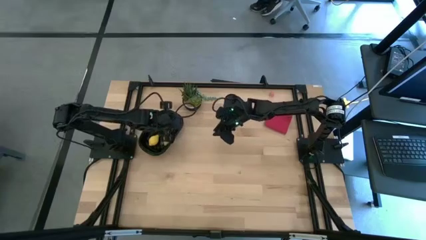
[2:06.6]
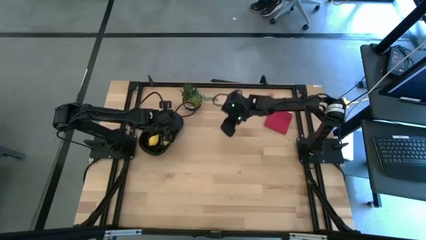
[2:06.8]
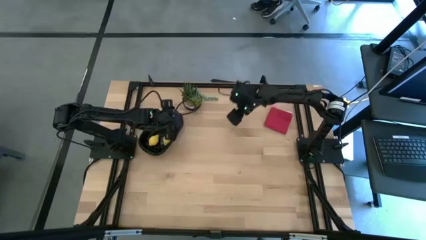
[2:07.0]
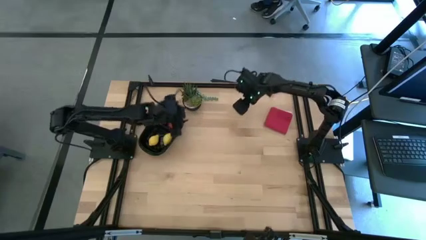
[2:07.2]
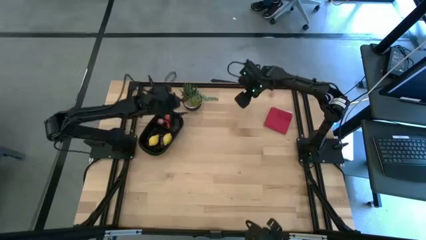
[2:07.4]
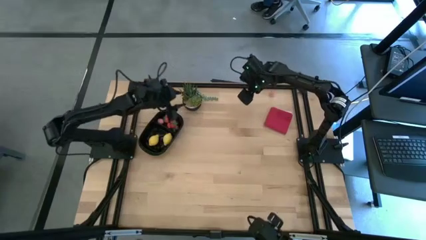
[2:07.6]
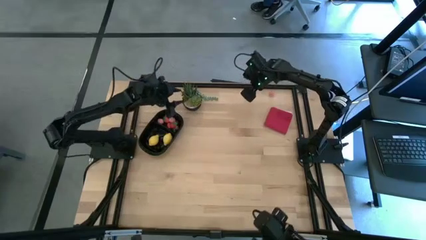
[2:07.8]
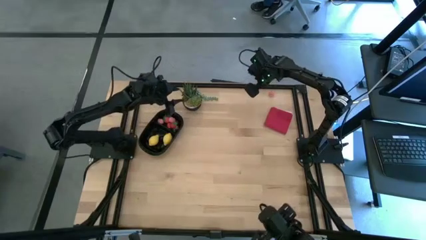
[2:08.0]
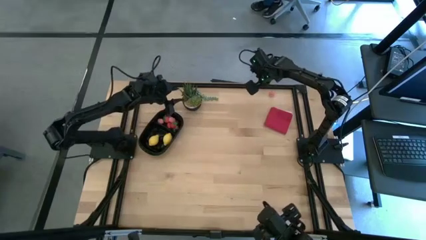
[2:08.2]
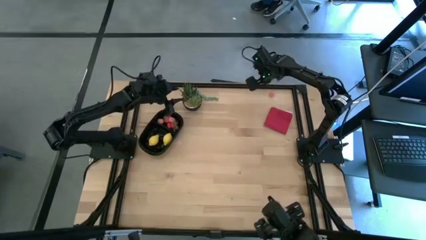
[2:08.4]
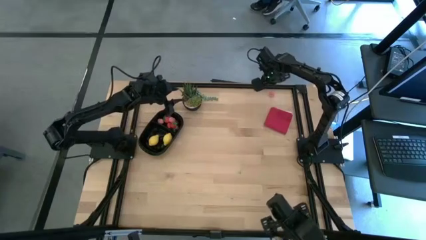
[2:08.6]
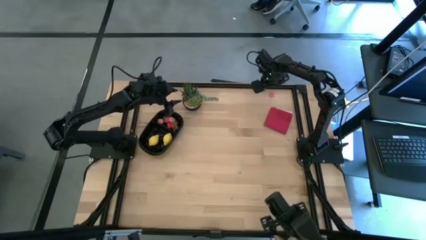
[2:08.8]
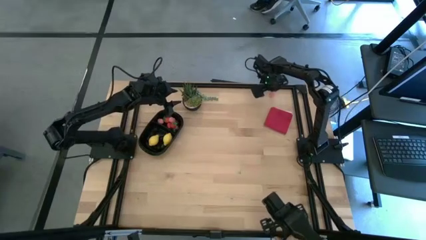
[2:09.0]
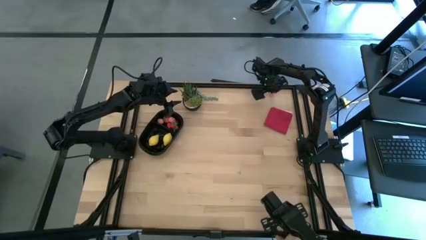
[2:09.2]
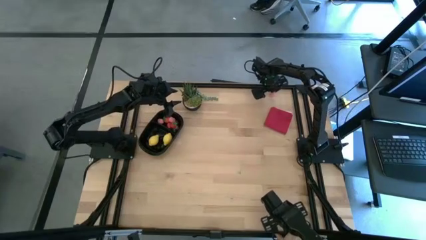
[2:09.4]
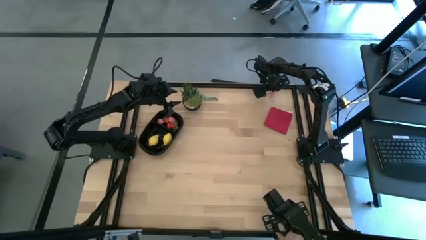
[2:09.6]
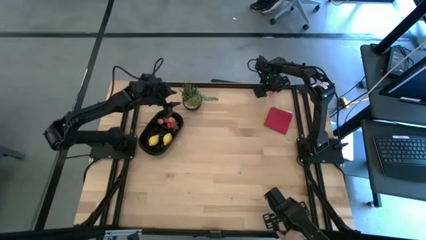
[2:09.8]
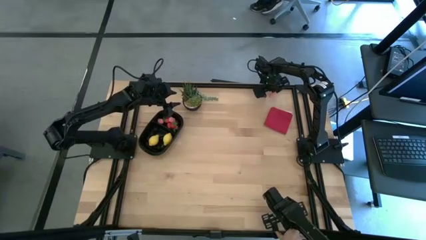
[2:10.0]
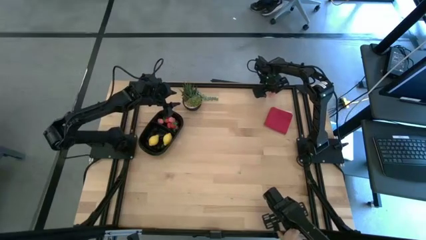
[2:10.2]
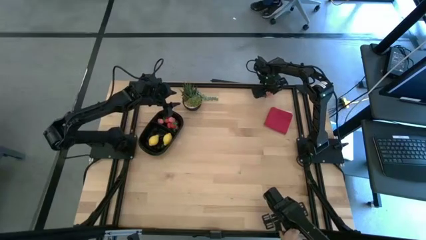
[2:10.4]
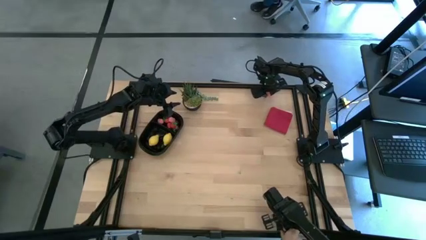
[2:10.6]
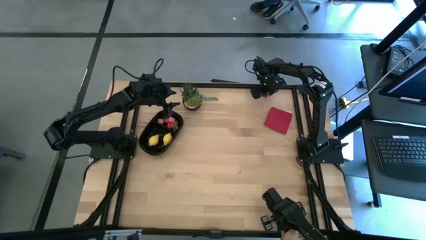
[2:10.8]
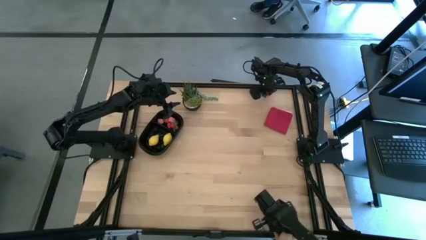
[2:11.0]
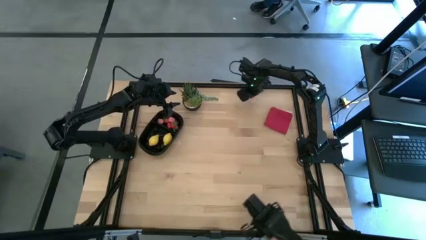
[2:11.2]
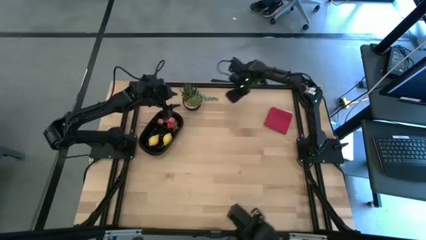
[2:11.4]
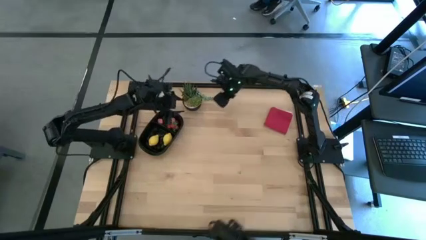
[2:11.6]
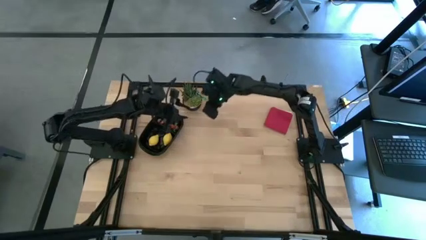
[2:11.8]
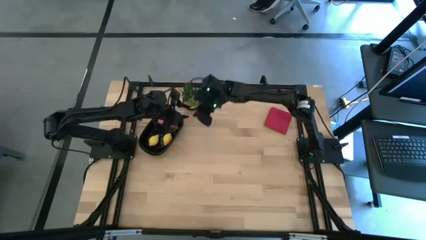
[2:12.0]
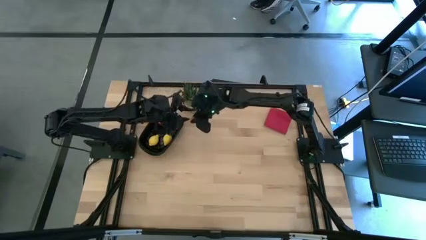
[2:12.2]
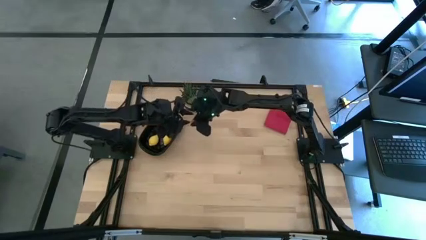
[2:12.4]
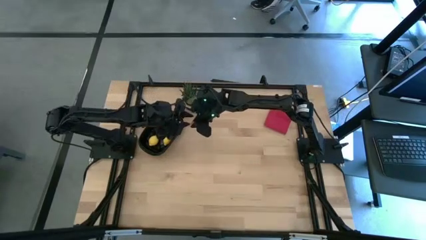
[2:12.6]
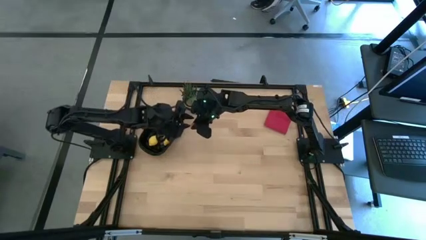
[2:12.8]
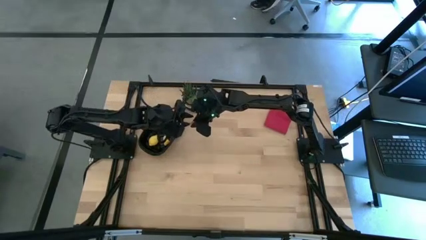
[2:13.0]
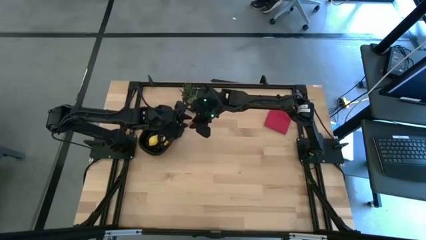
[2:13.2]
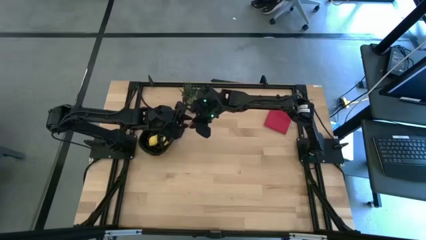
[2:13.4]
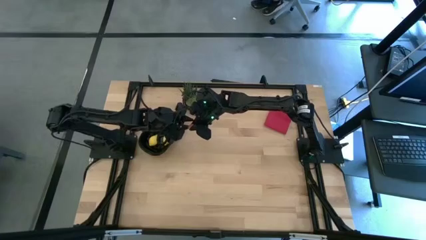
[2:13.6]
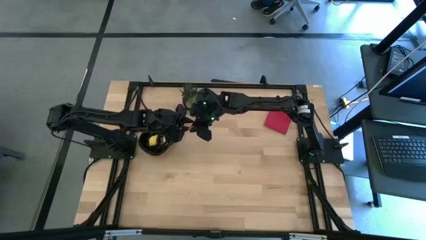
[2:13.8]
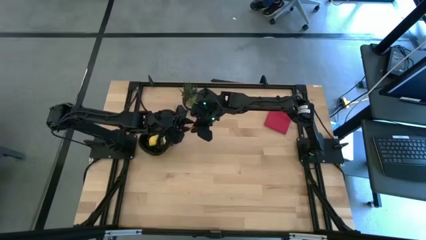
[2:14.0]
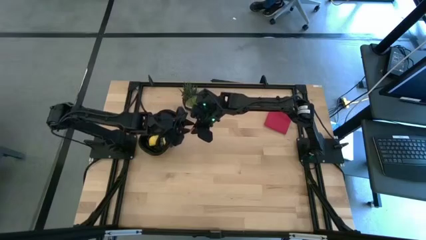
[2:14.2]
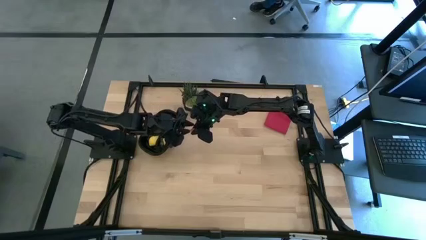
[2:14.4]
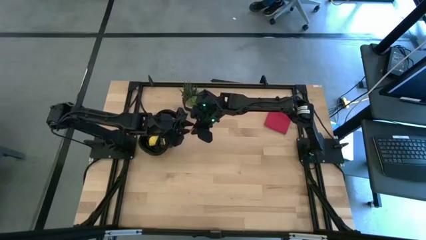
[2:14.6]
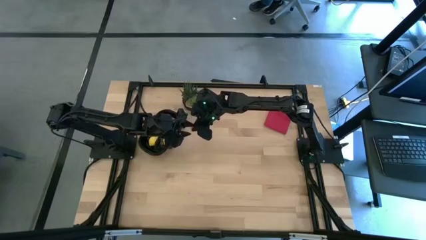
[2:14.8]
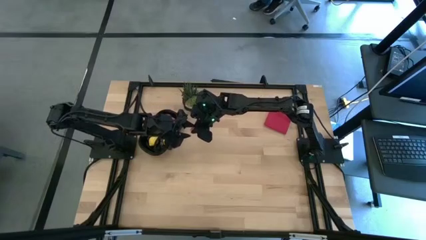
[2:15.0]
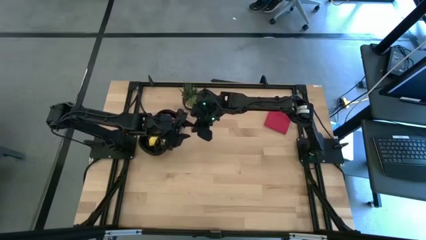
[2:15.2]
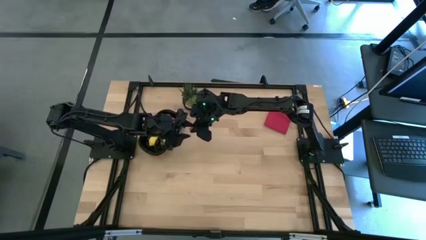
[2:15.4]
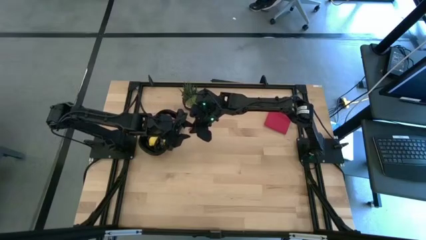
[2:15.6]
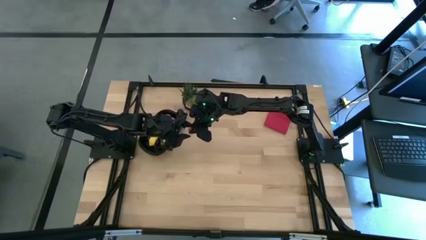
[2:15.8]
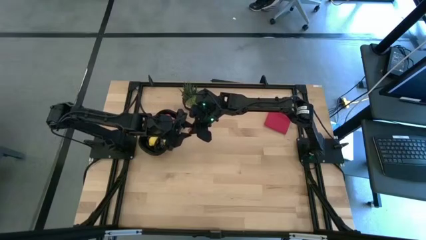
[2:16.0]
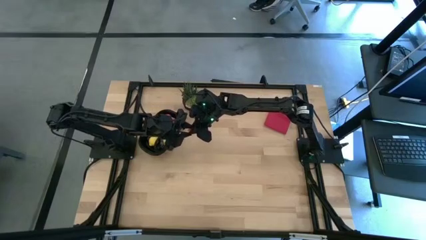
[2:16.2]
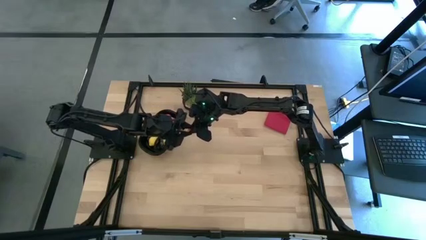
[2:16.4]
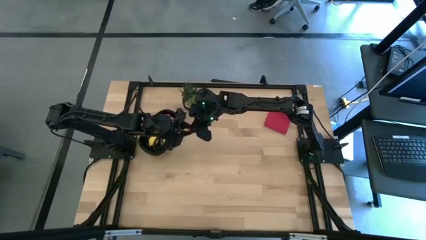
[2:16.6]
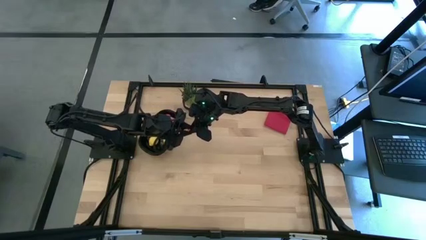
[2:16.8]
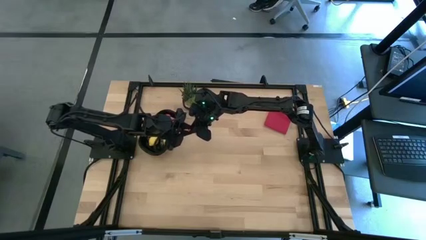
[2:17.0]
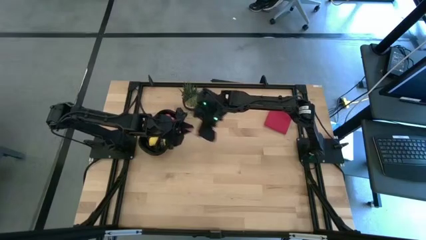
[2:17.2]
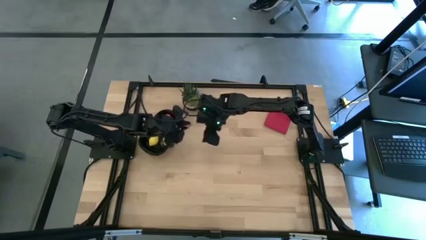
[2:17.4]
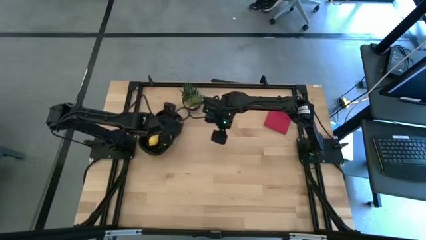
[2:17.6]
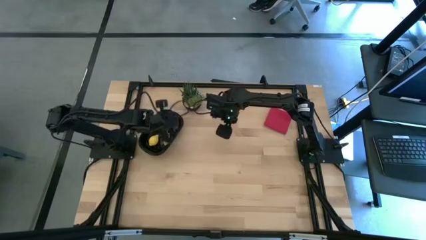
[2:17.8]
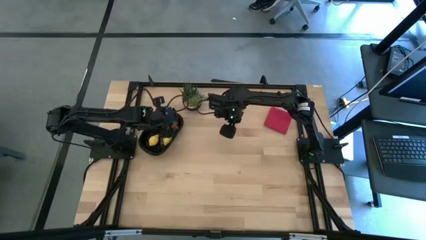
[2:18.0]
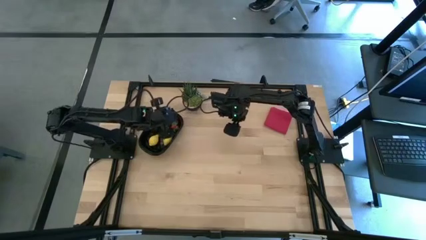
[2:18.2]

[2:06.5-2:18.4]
Task: Pick and placing Produce into tupperware
Put the pink peach into the black container

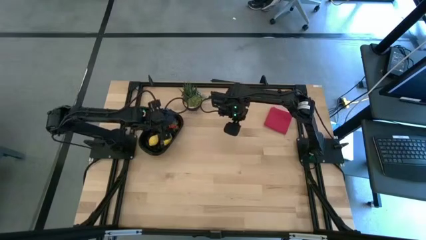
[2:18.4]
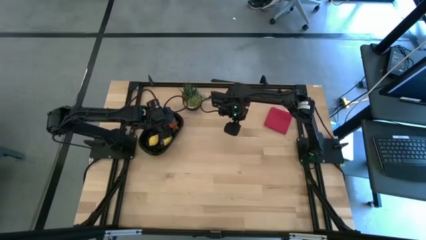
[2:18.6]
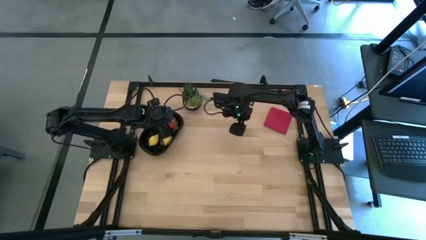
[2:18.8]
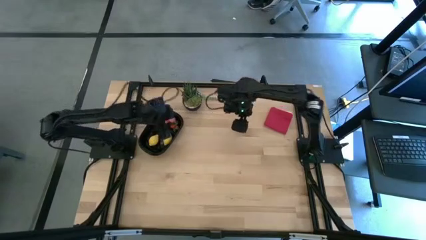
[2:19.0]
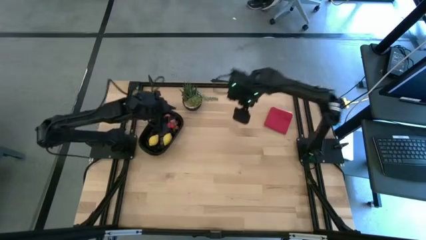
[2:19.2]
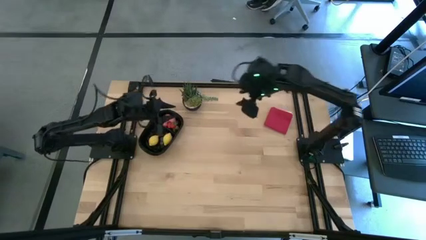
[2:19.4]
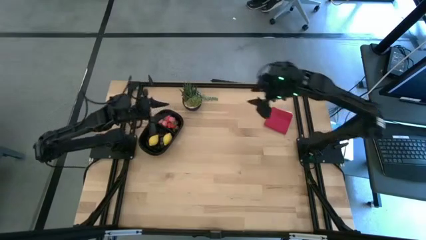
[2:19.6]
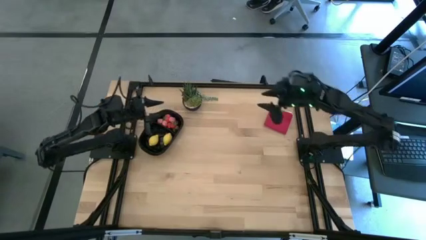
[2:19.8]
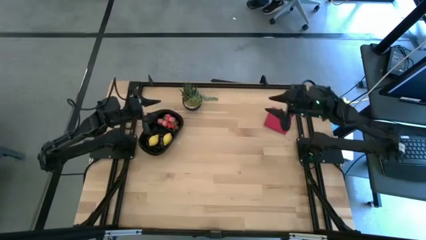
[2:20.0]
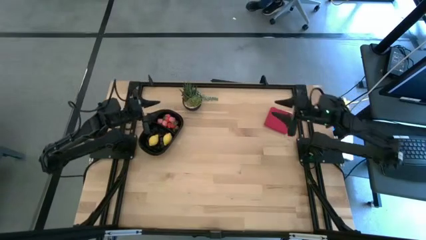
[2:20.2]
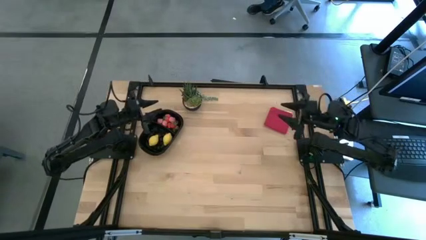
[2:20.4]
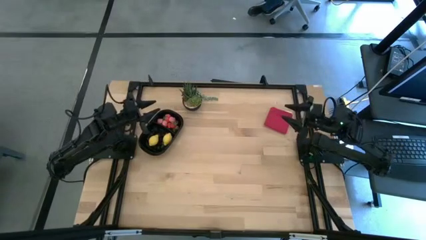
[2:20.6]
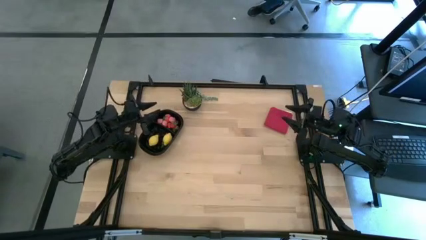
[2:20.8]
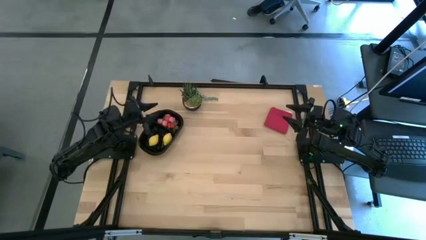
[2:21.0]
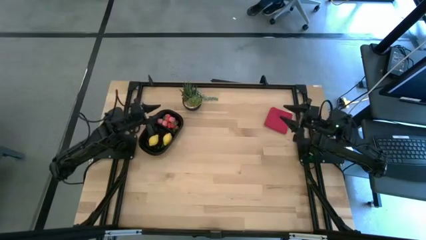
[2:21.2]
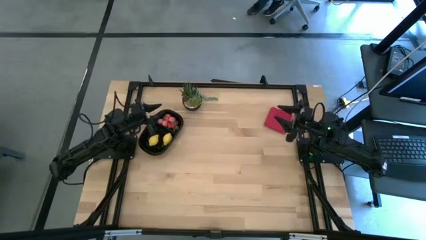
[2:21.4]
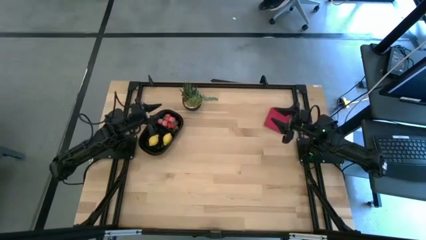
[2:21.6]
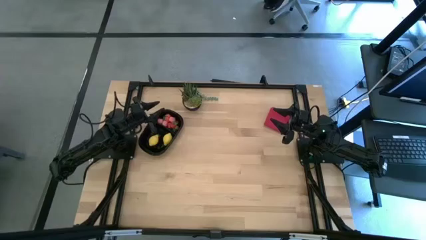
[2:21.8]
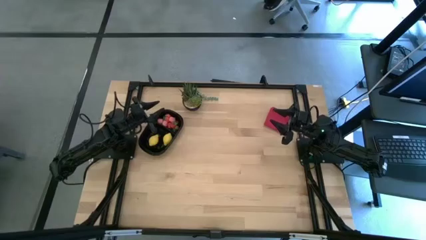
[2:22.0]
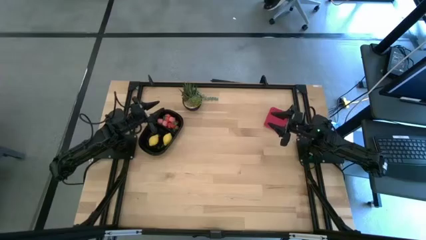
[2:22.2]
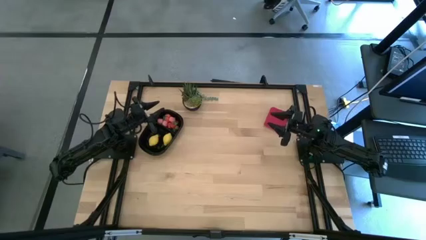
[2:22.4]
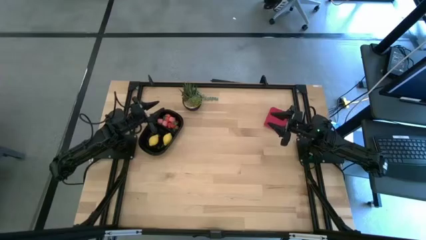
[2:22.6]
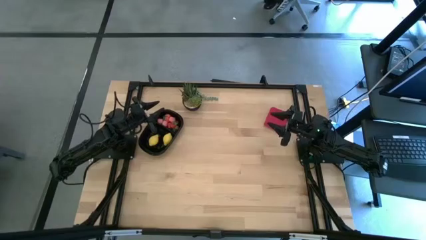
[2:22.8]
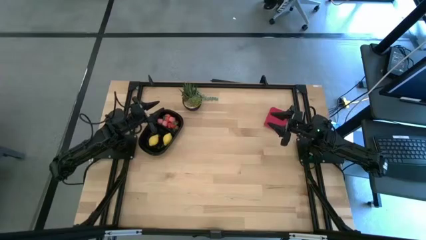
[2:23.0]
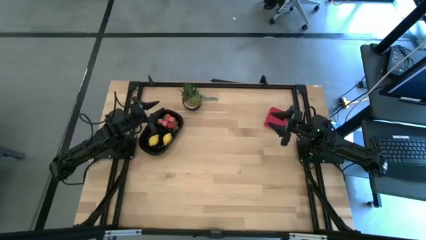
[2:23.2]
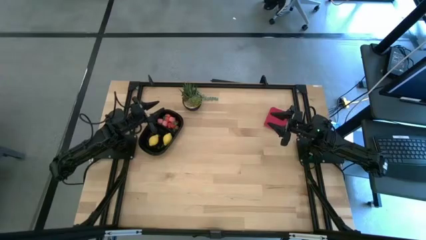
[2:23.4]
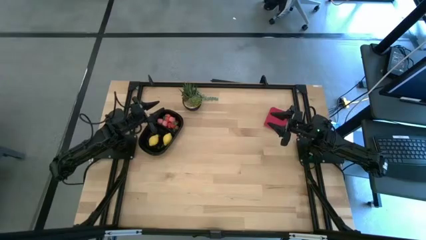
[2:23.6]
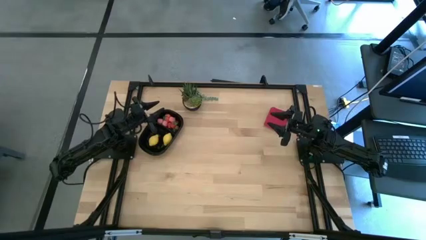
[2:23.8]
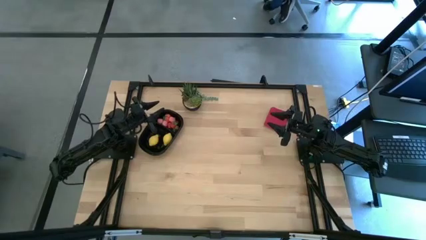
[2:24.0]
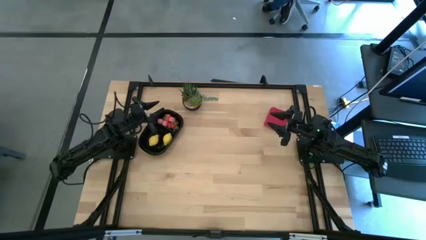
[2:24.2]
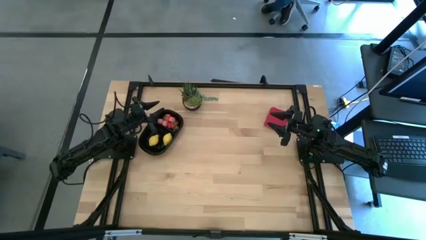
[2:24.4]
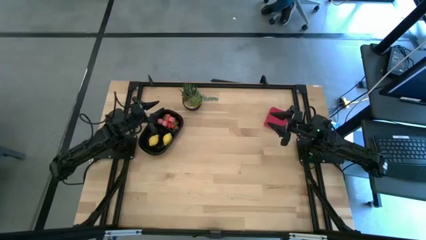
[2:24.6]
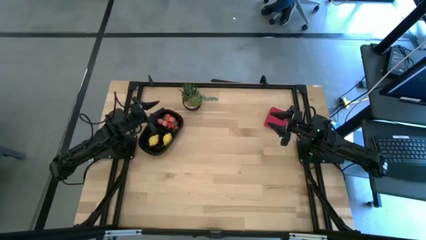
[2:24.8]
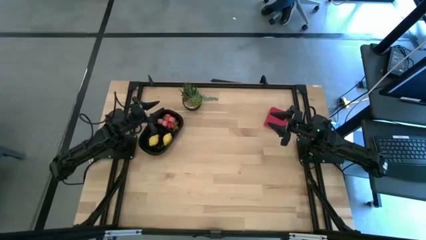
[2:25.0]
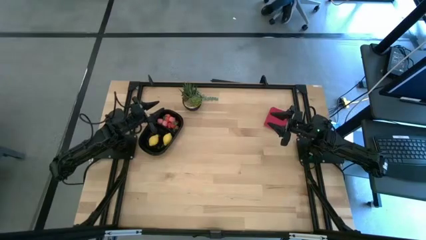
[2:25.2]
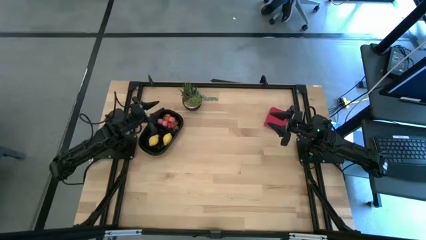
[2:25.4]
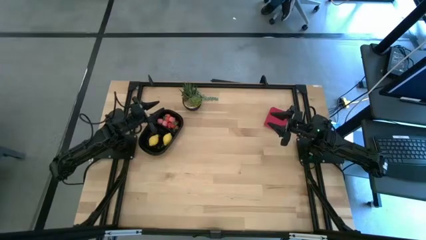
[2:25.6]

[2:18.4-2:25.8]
Return to Home Position
